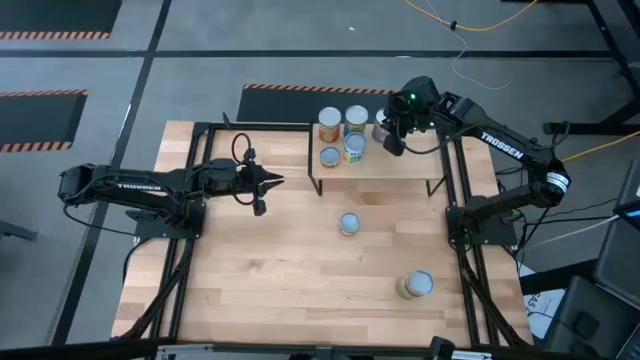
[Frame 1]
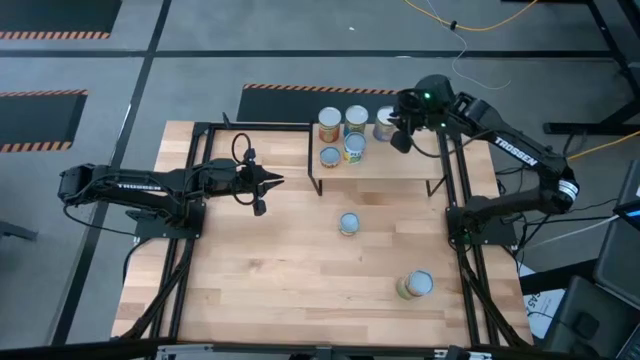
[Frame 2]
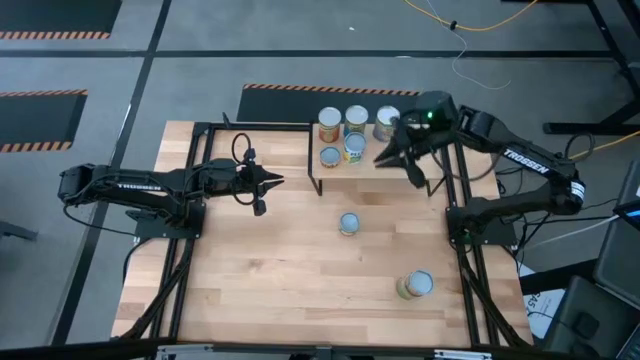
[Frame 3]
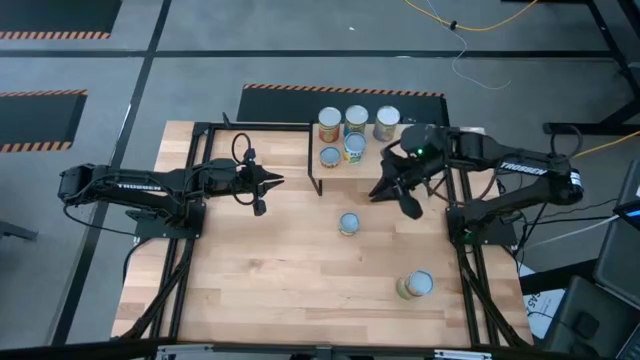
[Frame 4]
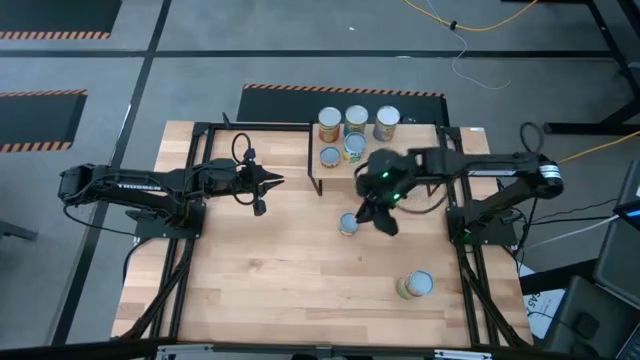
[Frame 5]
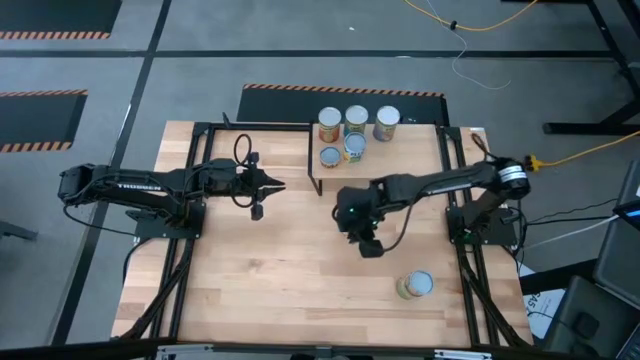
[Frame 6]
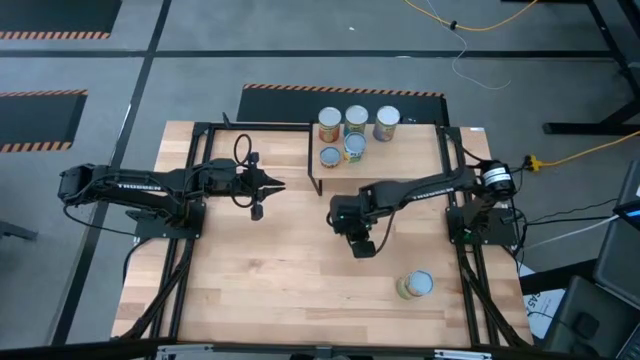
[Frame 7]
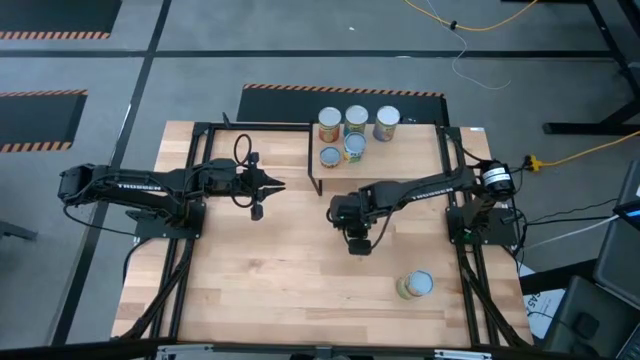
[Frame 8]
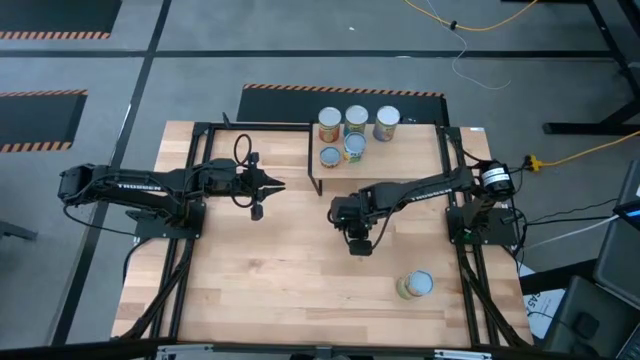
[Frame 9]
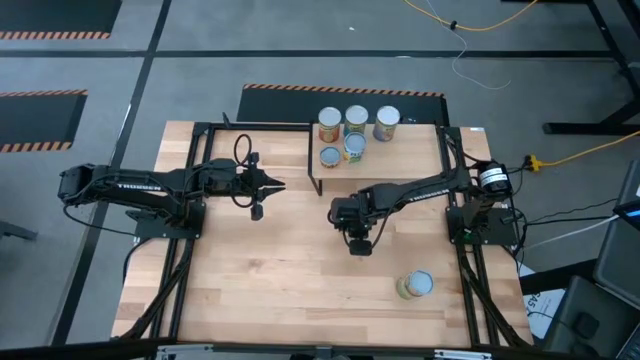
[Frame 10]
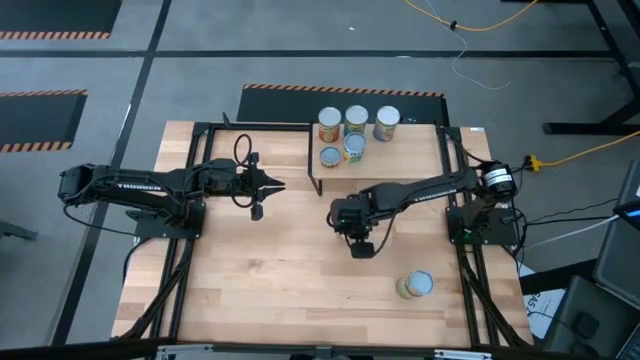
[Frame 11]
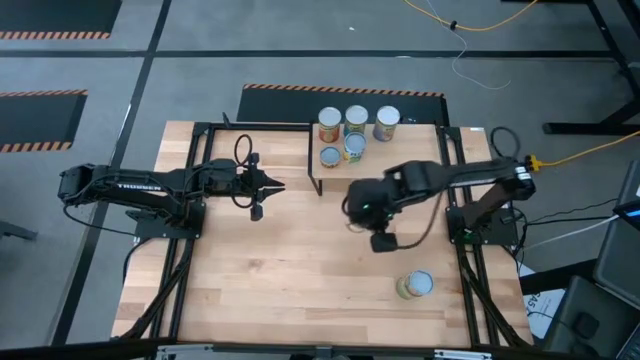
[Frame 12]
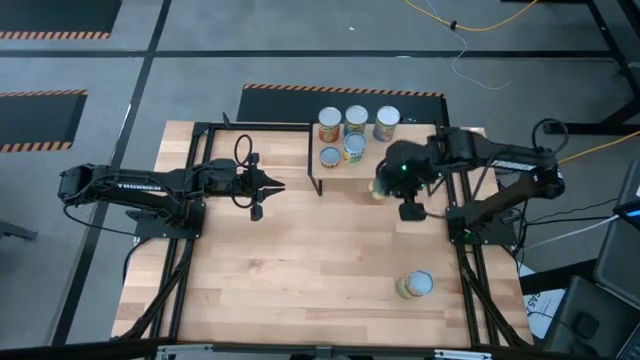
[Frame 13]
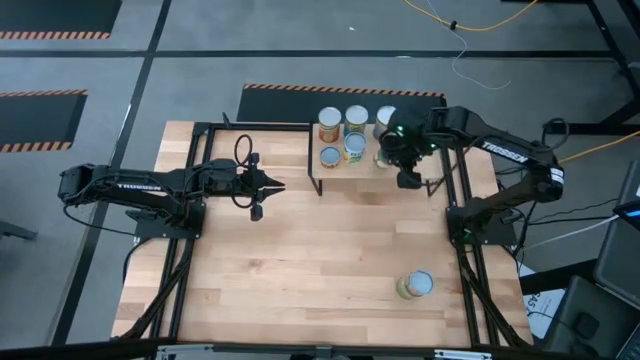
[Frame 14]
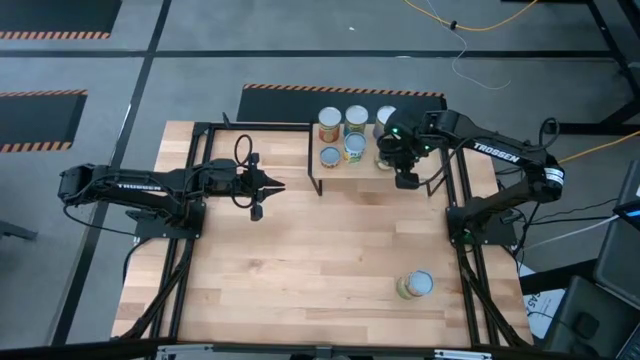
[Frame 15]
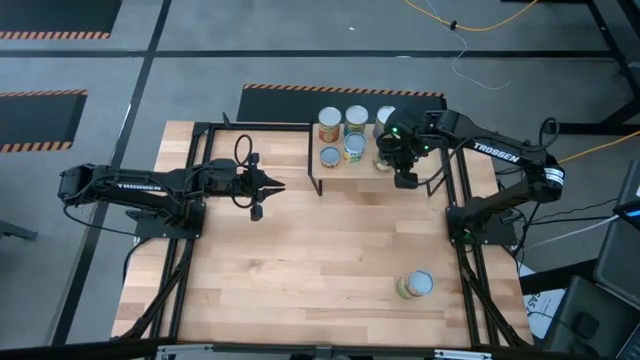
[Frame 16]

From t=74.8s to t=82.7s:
Task: Pick and place cans onto a shelf
Put the green canned sliced peaches on the shelf

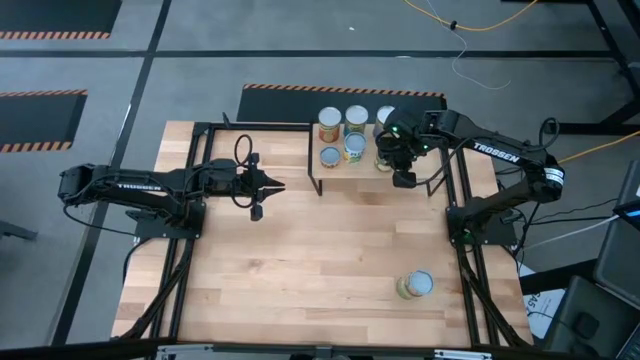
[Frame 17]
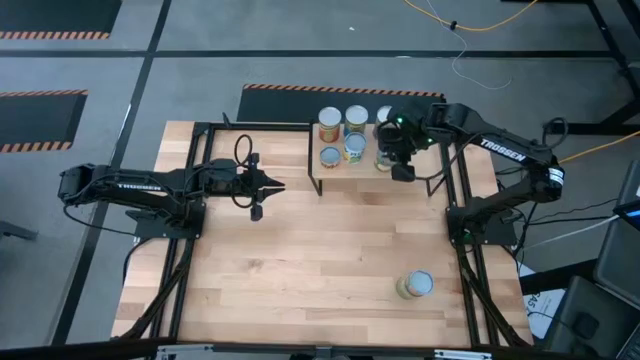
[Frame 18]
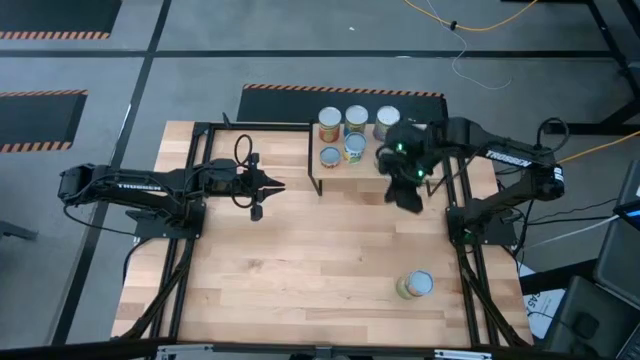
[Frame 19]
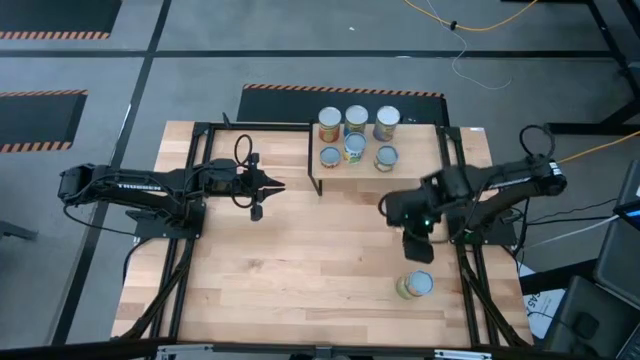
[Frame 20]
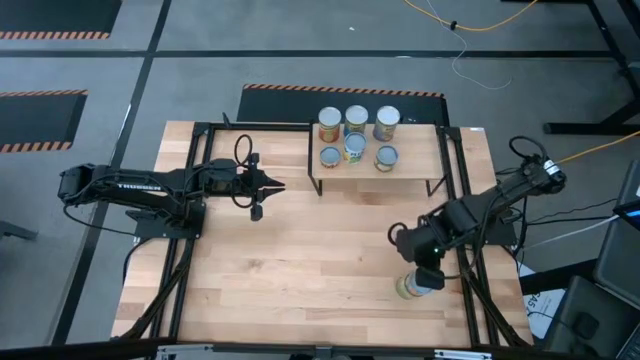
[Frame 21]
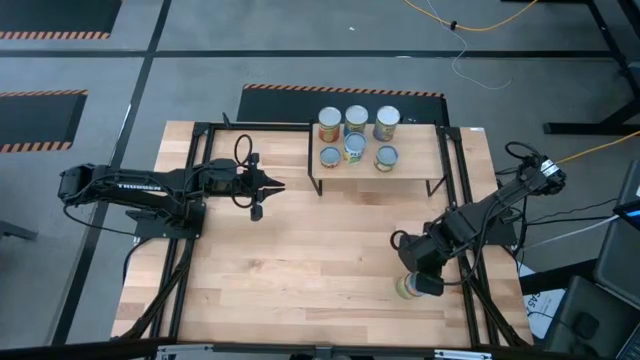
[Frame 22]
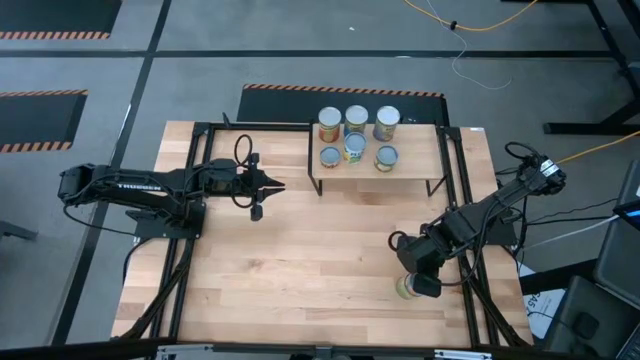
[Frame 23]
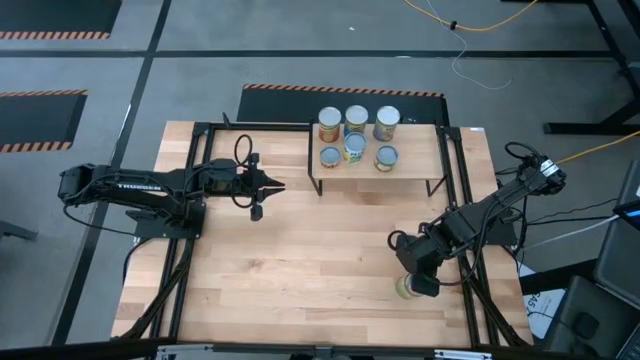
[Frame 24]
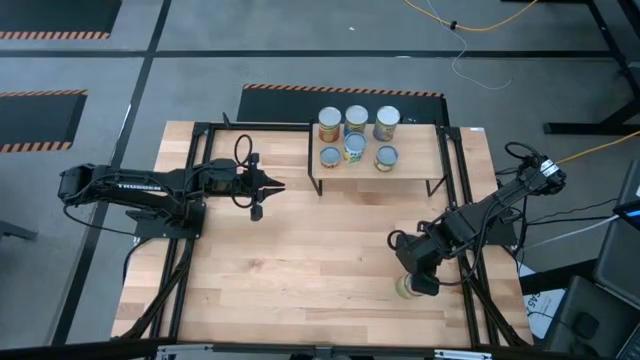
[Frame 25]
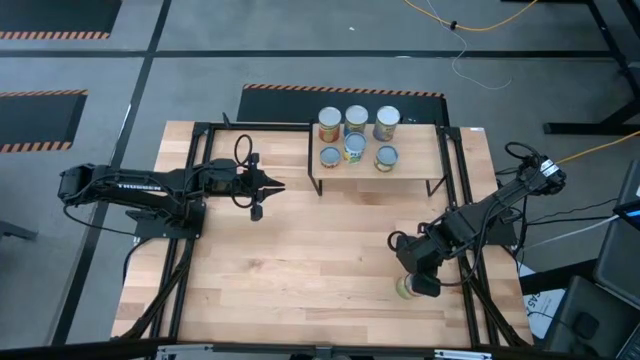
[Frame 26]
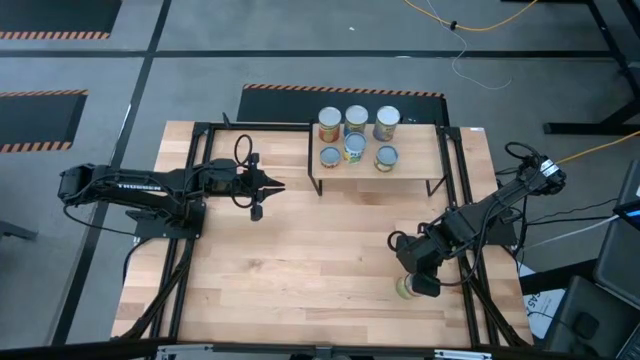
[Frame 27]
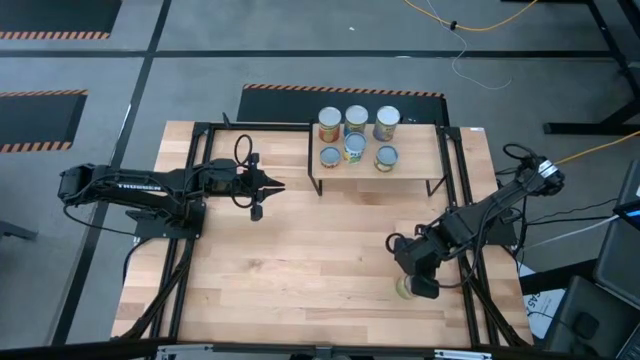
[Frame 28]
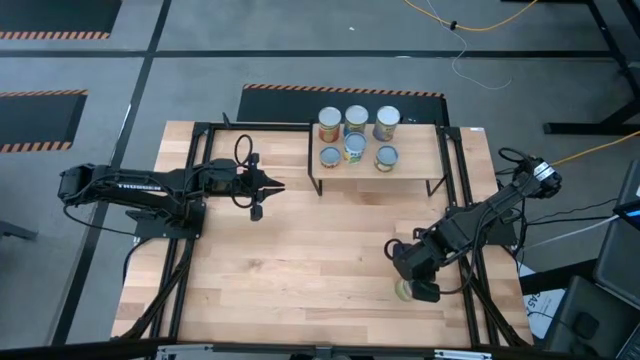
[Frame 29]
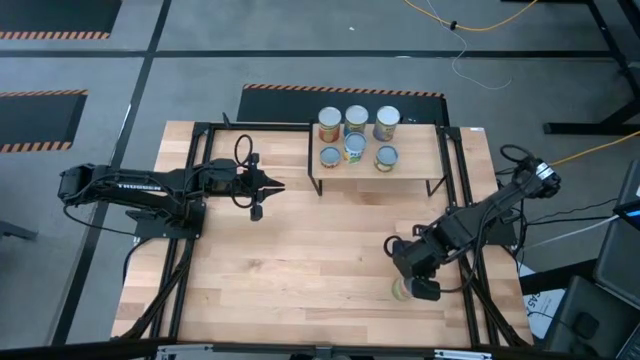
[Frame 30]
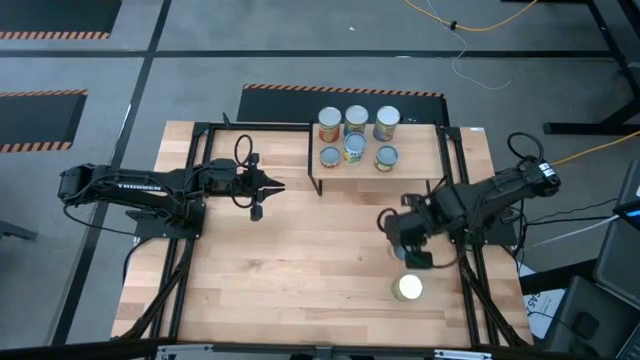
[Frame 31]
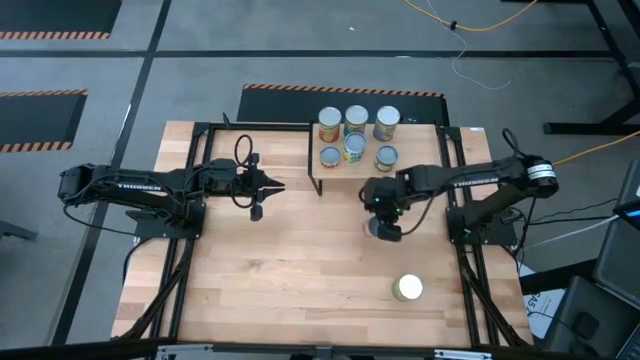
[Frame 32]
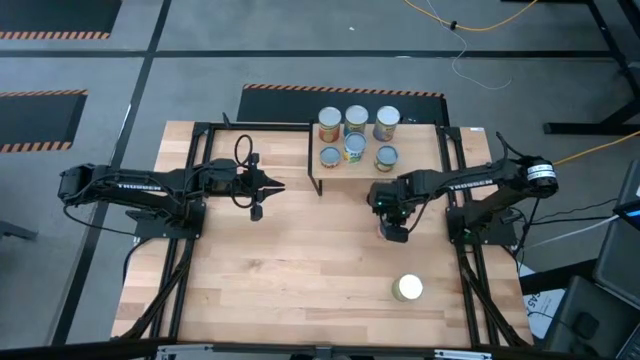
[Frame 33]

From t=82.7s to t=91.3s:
Move the green and orange canned oranges to the top right side of the table

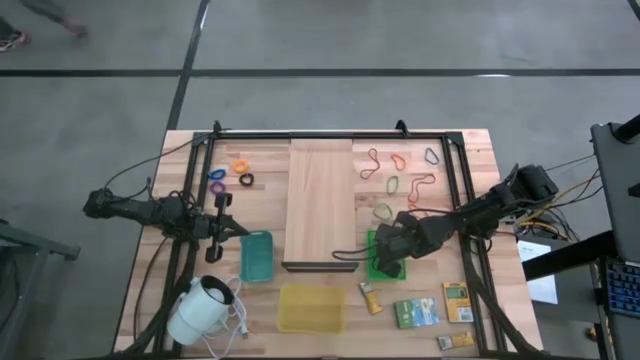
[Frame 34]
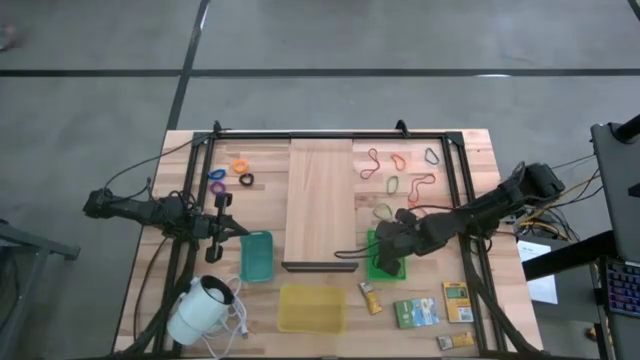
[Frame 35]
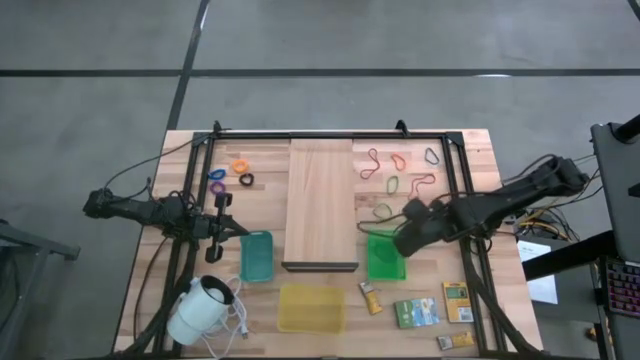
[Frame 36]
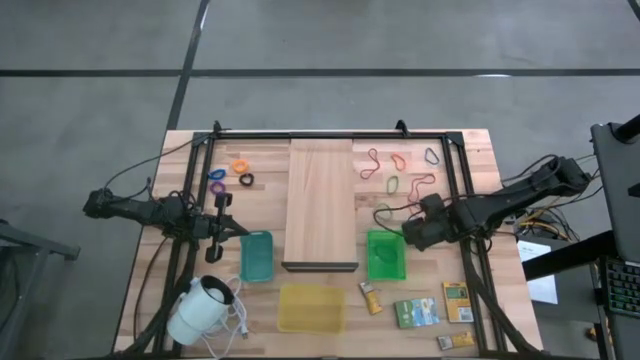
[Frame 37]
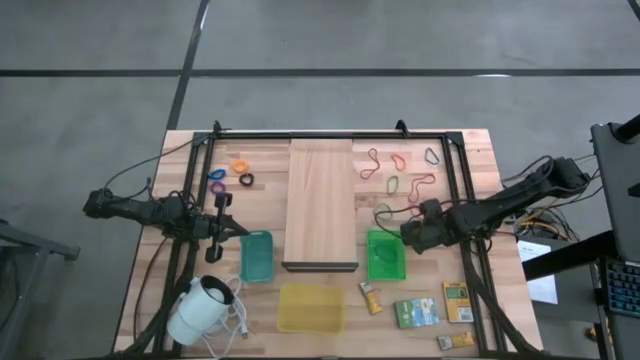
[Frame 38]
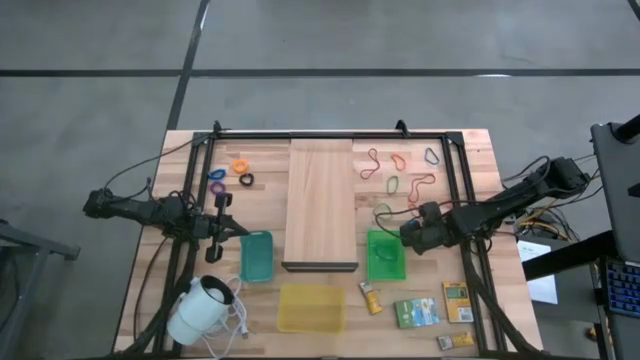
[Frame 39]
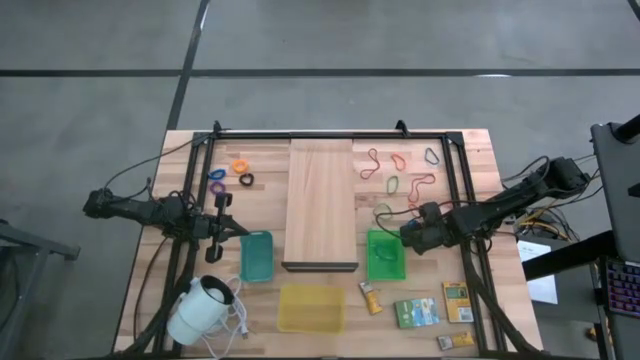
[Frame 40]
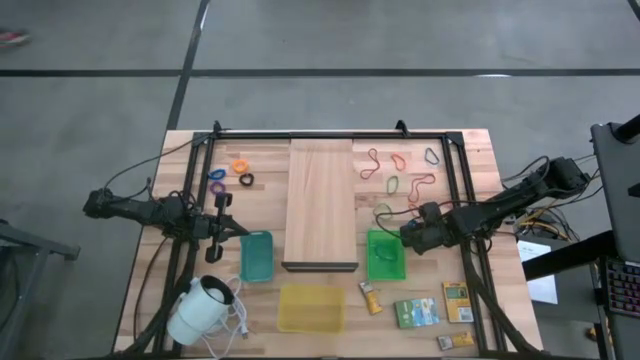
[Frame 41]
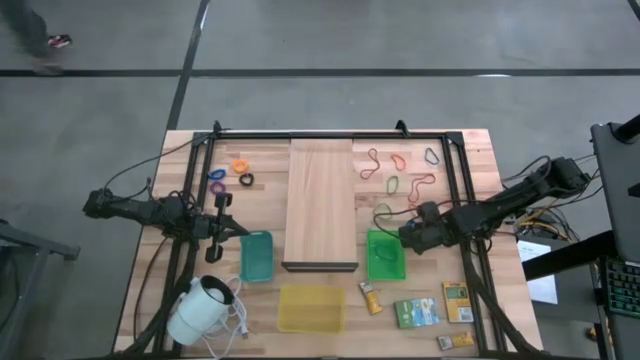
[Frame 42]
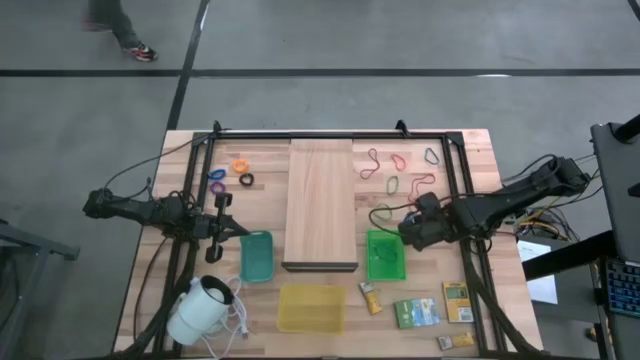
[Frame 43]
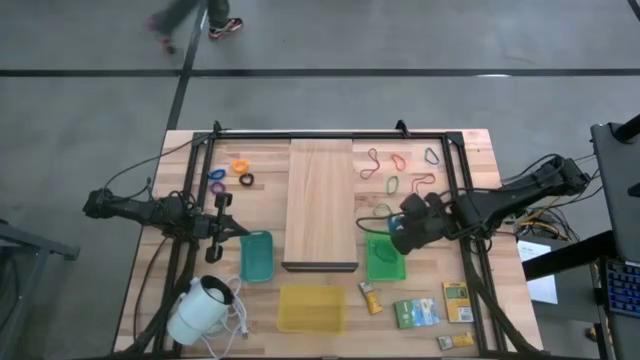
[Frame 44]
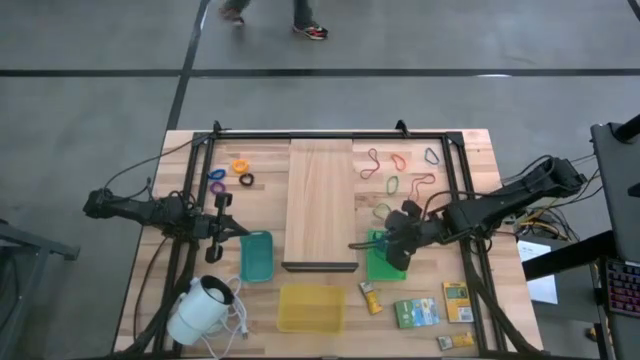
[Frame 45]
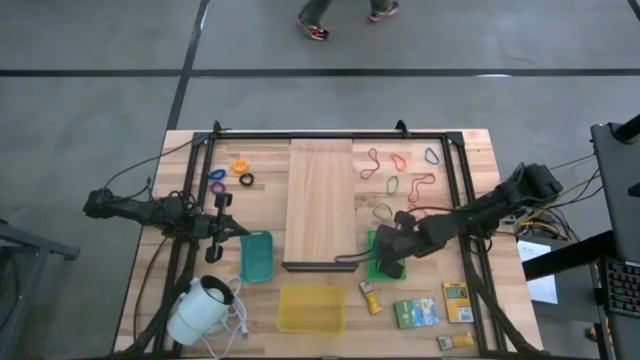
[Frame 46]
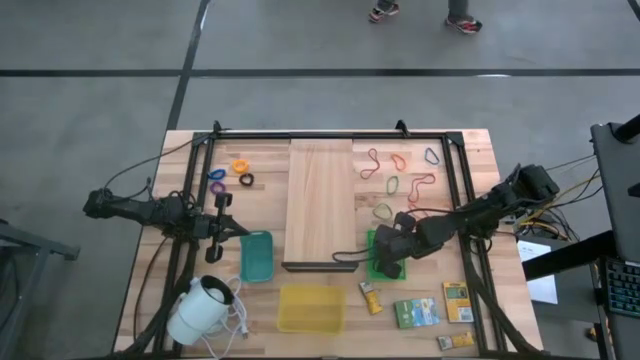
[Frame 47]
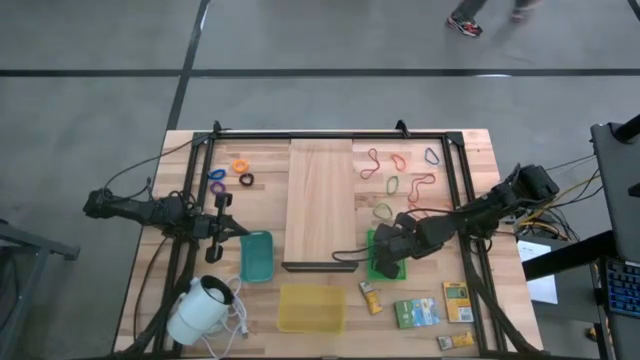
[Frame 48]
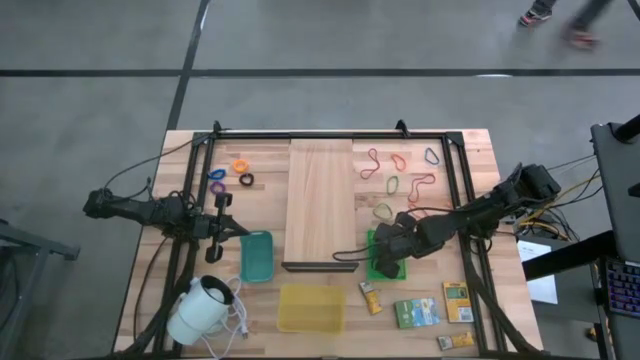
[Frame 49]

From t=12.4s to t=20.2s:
Task: Pick & Place Office Desk Supplies
Put the thick blue rubber band into the green bin
